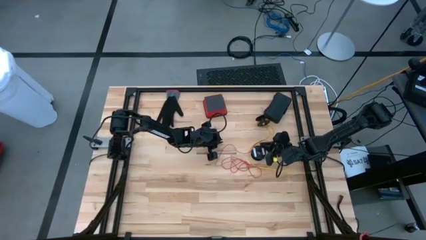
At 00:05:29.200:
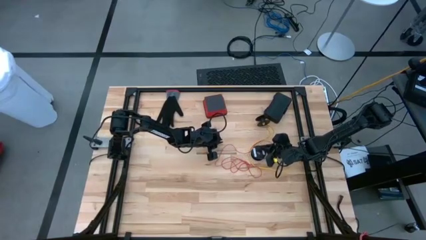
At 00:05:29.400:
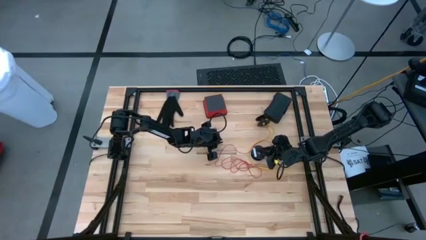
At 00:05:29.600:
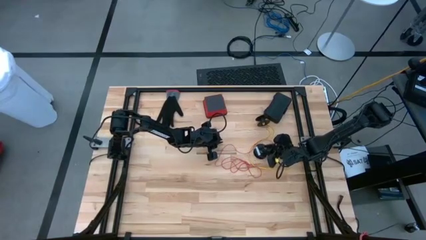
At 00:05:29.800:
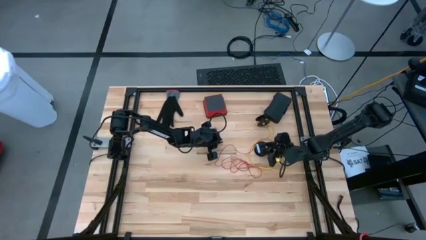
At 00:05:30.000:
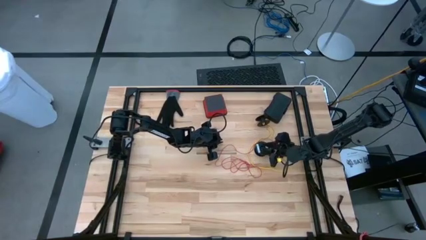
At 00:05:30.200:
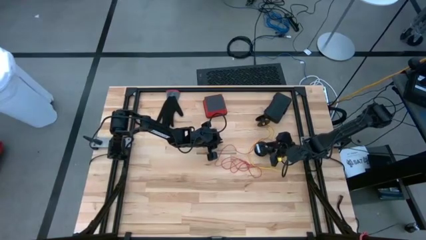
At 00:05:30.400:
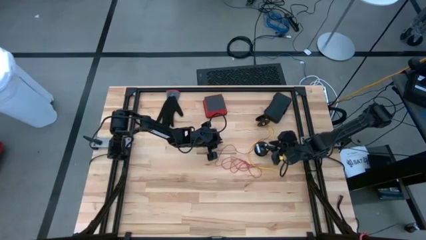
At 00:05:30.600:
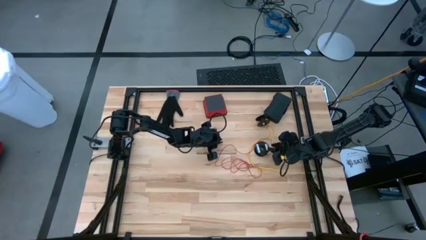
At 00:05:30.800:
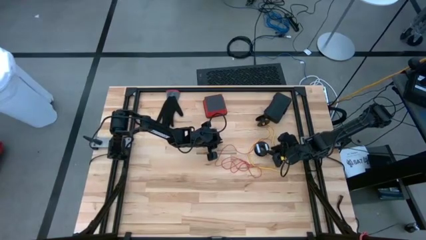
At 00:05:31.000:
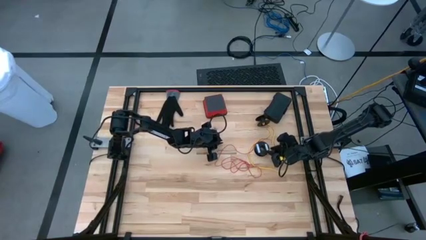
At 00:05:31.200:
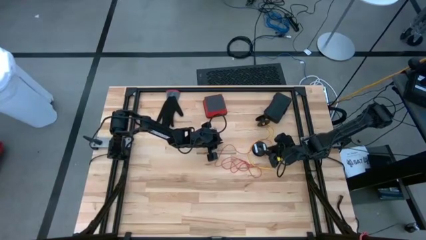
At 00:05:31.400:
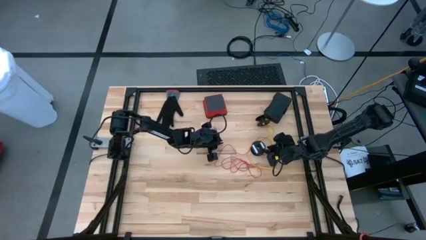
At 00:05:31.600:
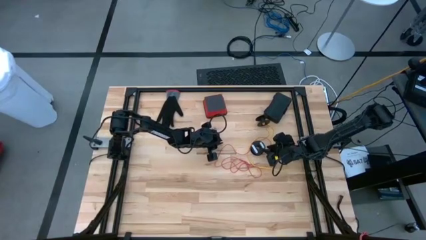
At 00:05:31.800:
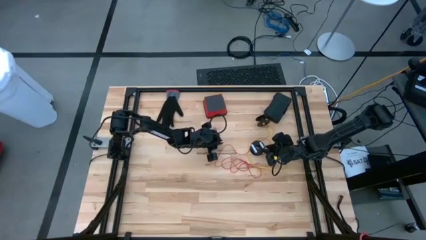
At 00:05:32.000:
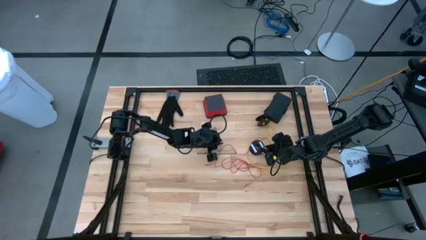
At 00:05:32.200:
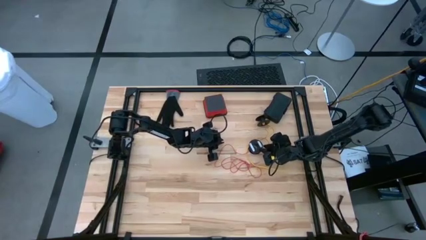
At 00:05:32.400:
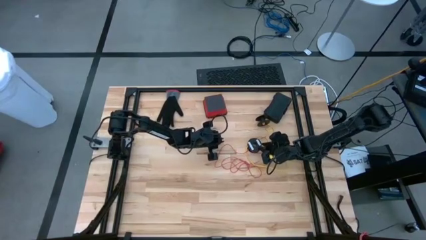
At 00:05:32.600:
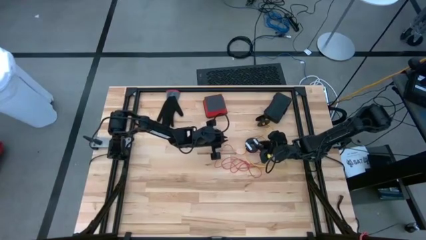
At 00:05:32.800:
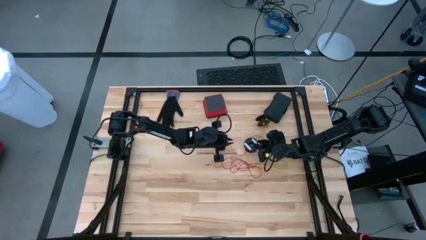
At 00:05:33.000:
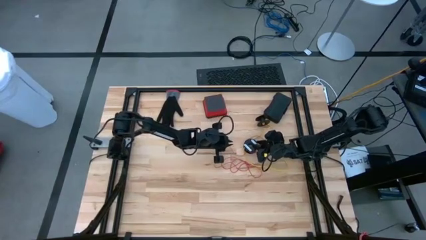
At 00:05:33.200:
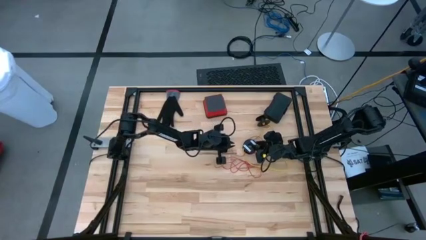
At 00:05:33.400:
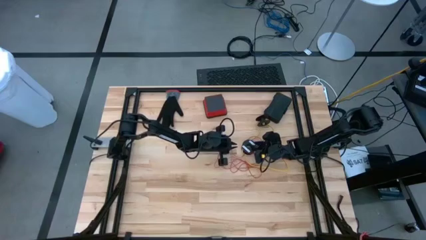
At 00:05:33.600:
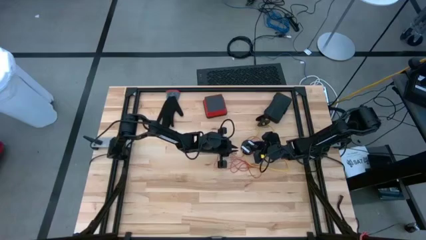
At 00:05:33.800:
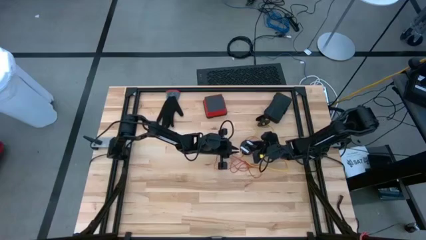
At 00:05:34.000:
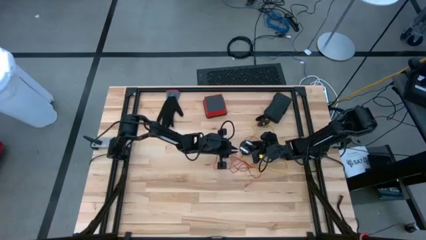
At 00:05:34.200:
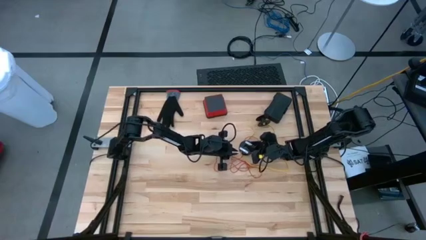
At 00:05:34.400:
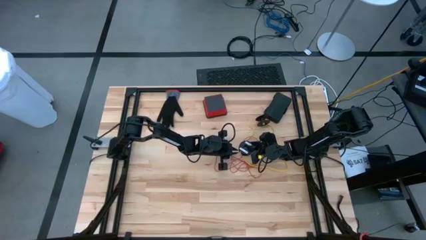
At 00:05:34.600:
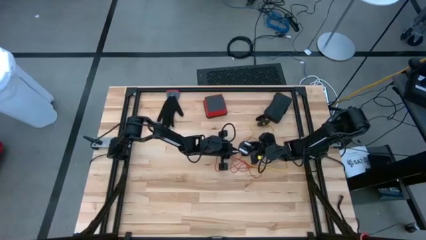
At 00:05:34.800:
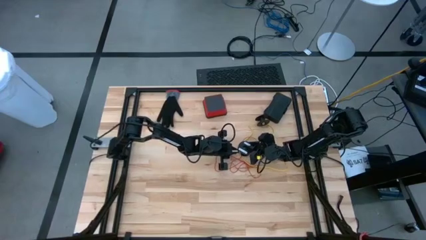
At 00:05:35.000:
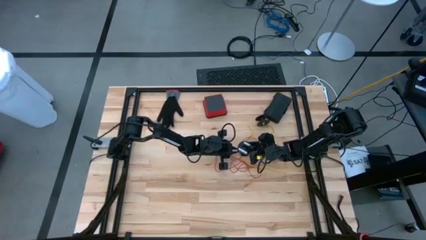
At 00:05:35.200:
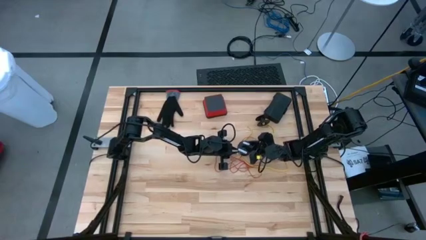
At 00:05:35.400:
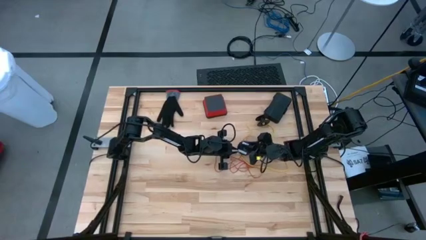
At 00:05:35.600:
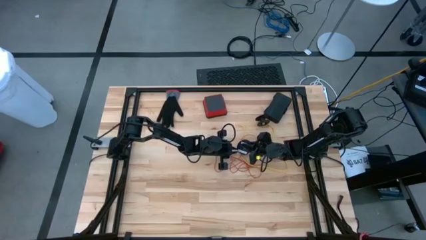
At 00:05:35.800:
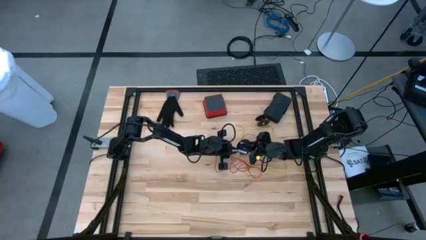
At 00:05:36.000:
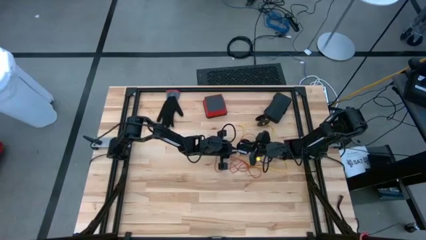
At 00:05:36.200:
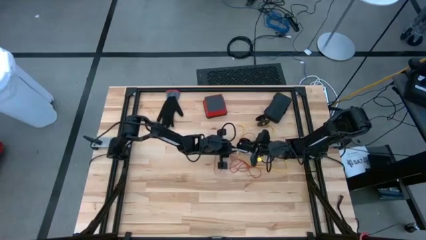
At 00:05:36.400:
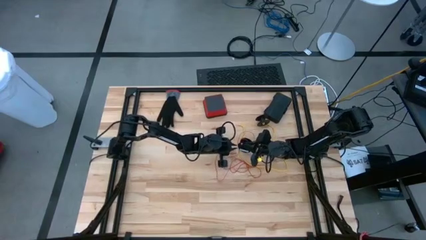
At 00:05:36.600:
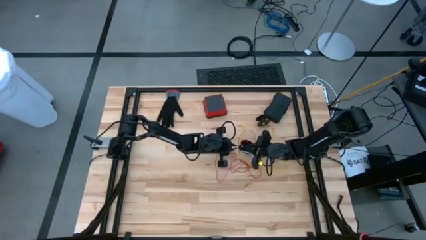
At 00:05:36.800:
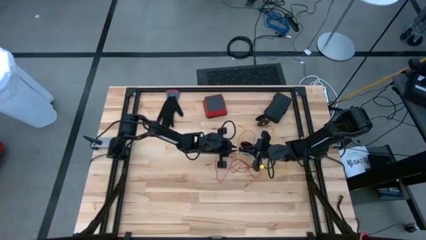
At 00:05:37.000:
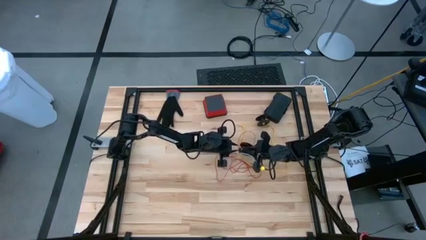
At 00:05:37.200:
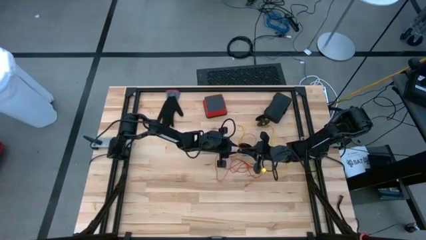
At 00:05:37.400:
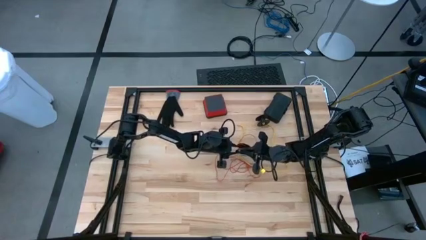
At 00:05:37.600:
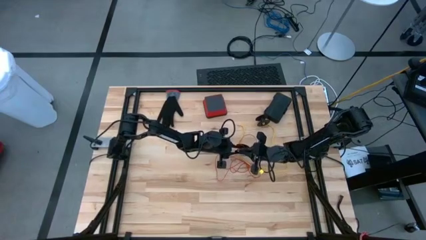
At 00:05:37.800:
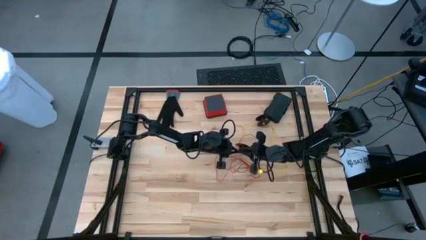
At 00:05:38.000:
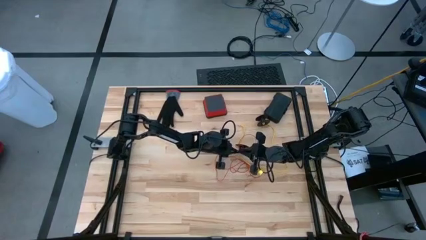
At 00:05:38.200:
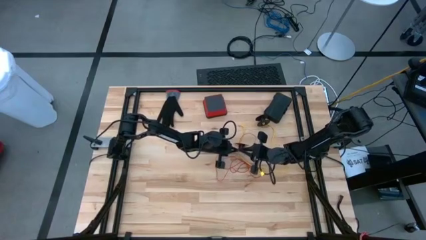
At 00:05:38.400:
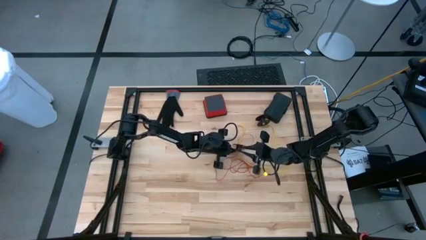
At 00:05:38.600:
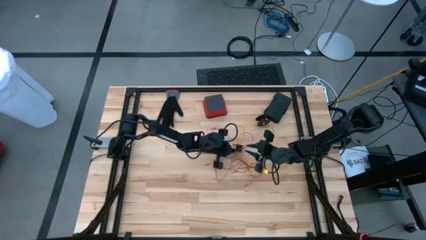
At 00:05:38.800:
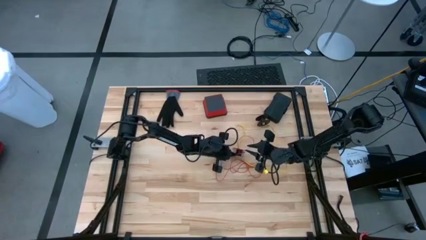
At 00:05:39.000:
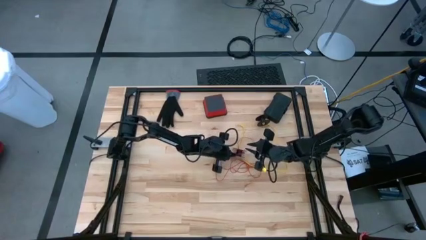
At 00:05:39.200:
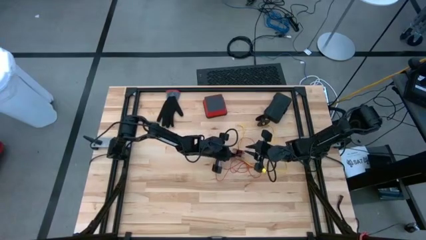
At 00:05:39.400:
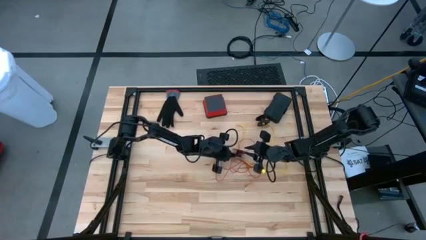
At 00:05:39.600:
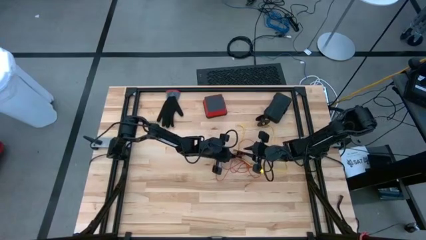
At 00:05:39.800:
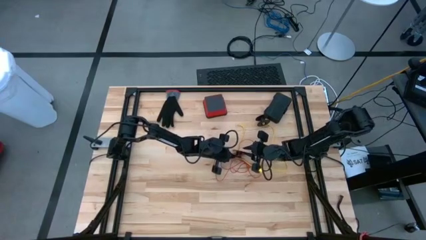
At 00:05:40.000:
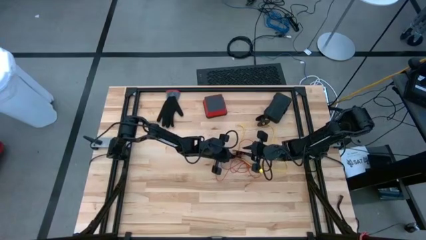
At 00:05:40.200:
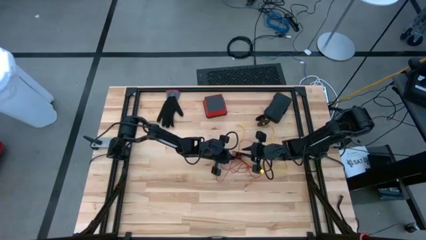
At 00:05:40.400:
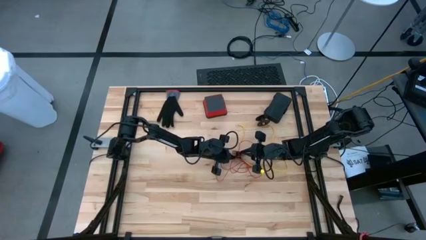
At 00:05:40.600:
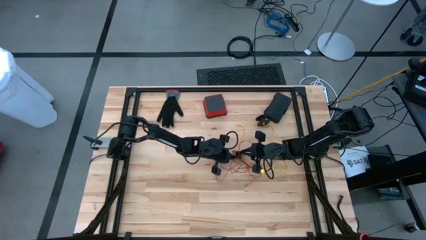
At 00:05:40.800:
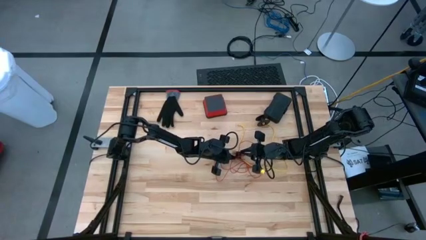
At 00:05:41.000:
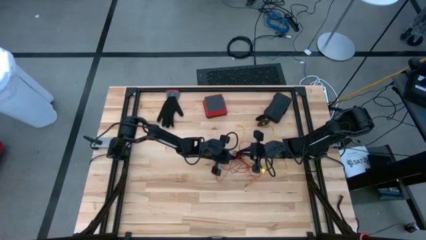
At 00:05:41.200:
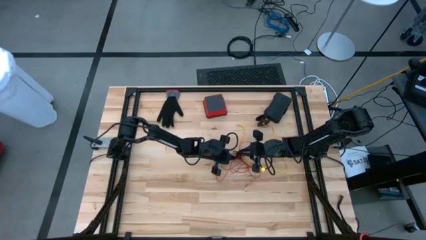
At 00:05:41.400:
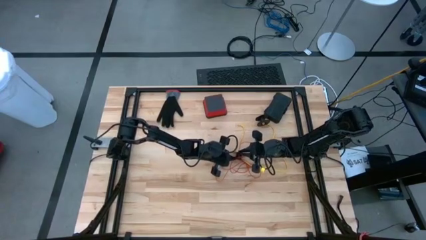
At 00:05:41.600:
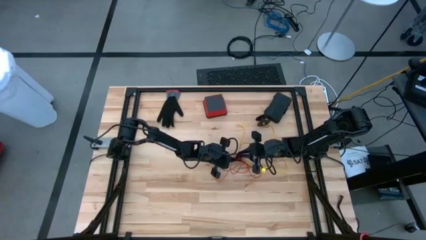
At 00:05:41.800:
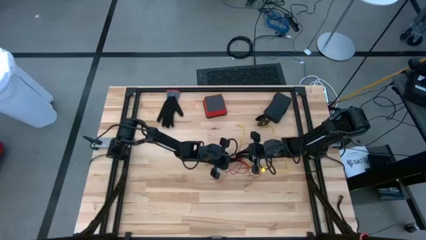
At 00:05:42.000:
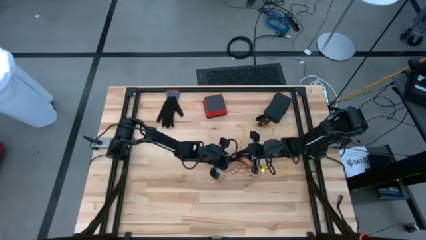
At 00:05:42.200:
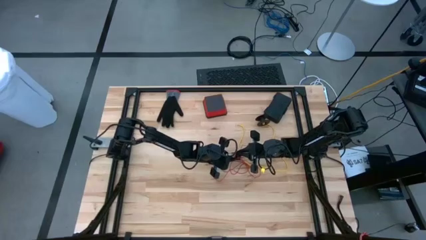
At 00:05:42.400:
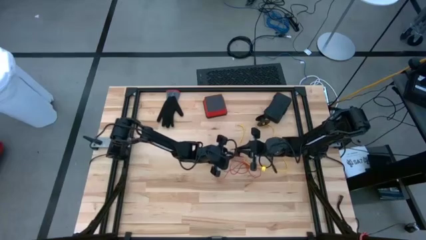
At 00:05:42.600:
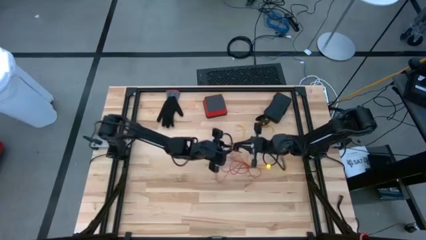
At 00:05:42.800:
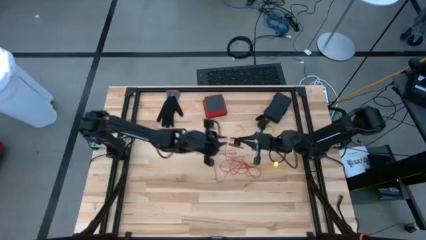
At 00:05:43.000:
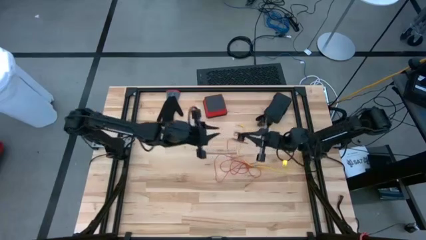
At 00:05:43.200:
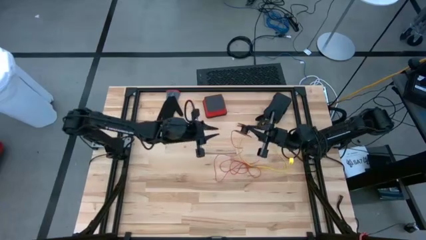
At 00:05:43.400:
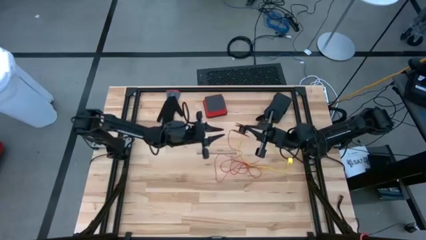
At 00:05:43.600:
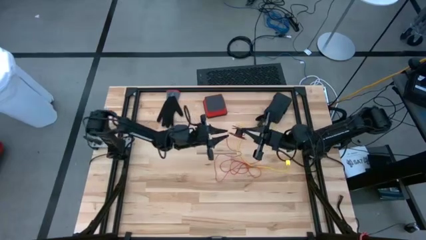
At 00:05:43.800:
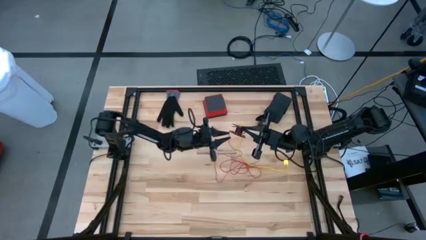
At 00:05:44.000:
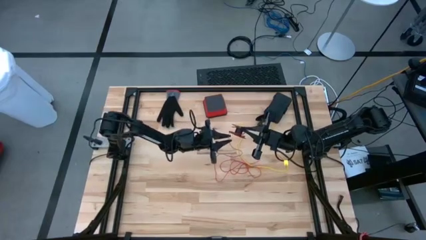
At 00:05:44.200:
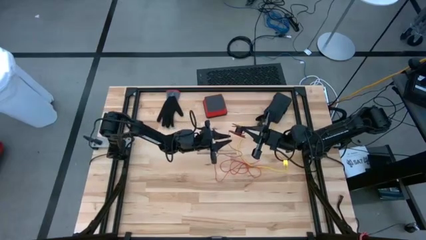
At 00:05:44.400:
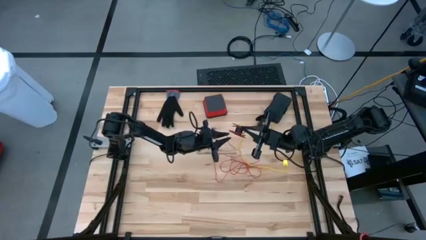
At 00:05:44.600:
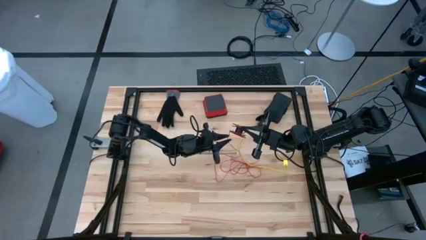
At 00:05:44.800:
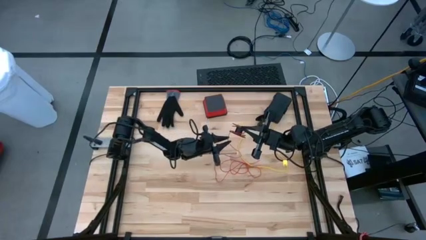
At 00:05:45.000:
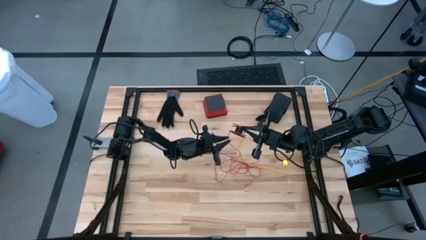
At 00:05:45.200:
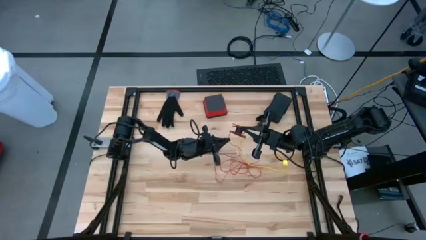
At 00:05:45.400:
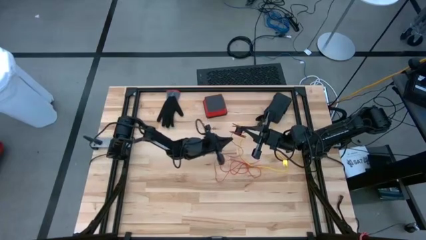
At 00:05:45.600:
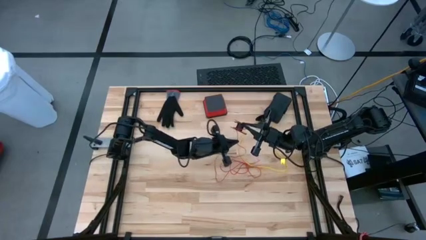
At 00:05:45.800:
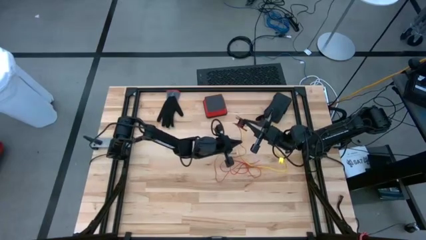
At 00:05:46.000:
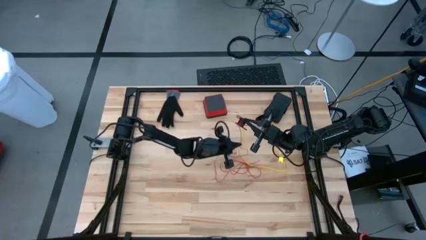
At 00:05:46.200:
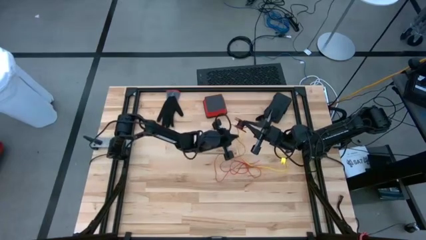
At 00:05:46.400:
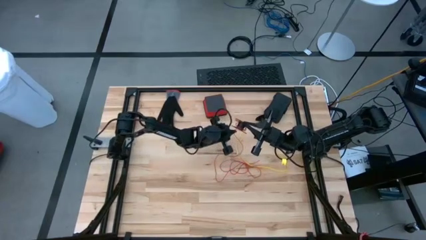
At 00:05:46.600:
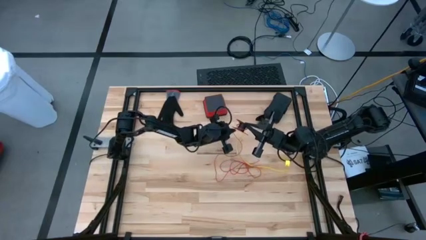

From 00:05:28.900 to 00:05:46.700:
Task: Coil cords
Coil the red wire onto the spool
